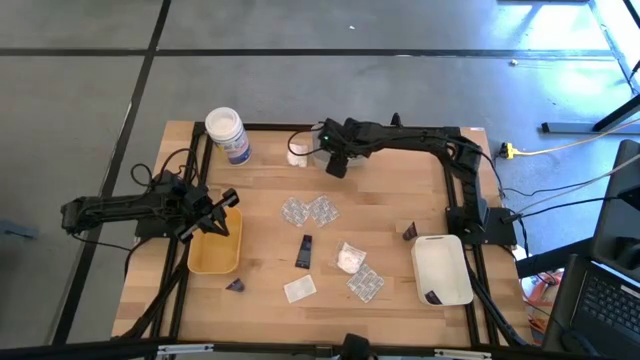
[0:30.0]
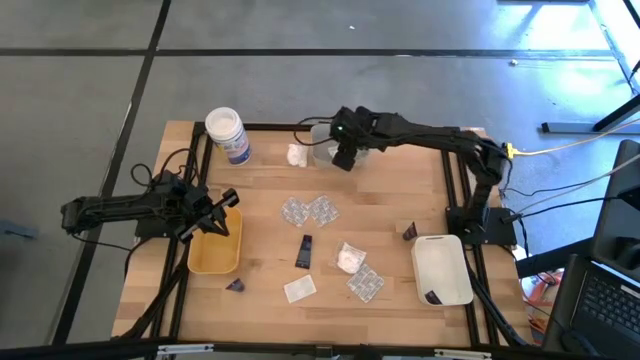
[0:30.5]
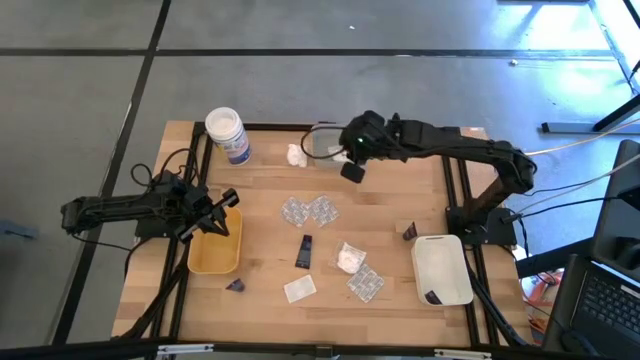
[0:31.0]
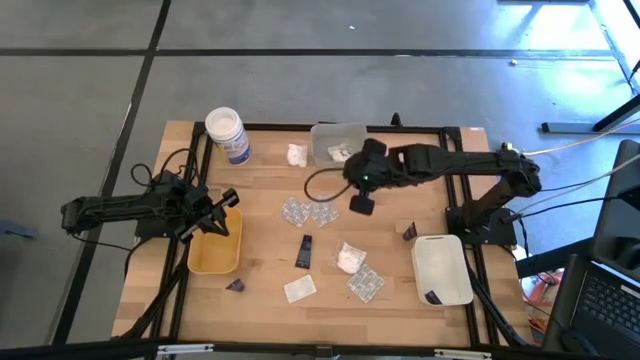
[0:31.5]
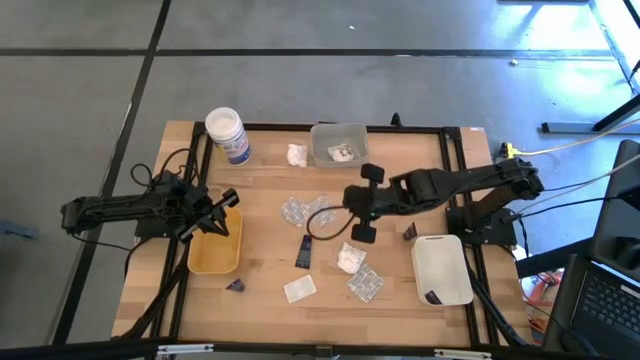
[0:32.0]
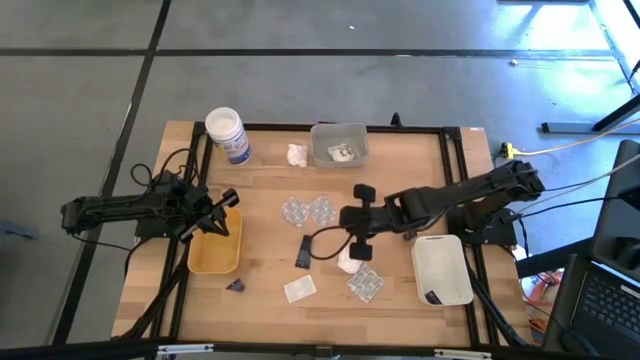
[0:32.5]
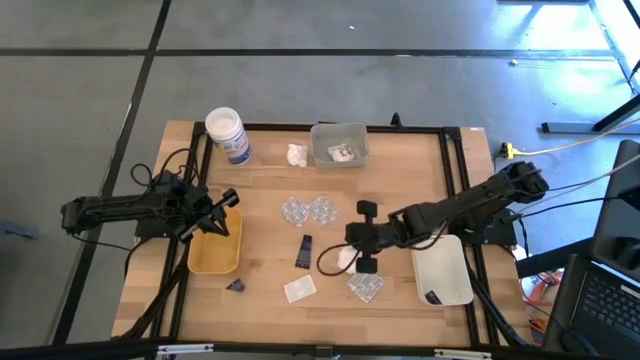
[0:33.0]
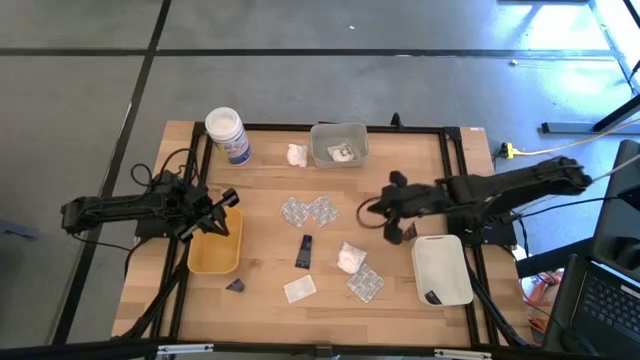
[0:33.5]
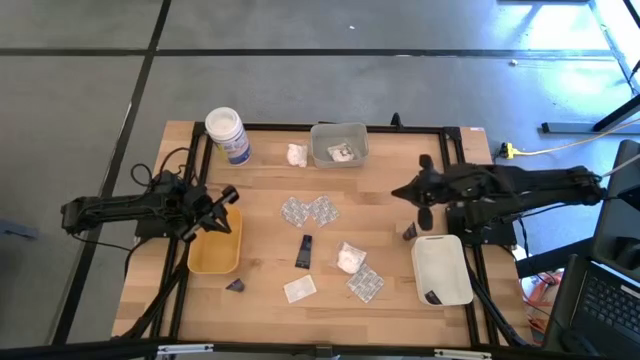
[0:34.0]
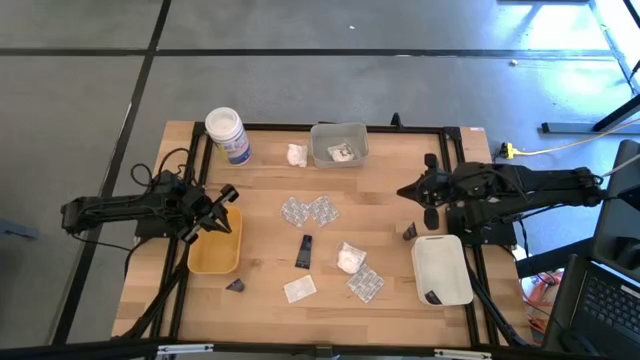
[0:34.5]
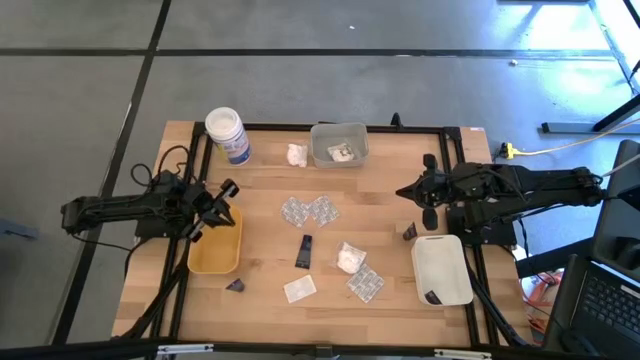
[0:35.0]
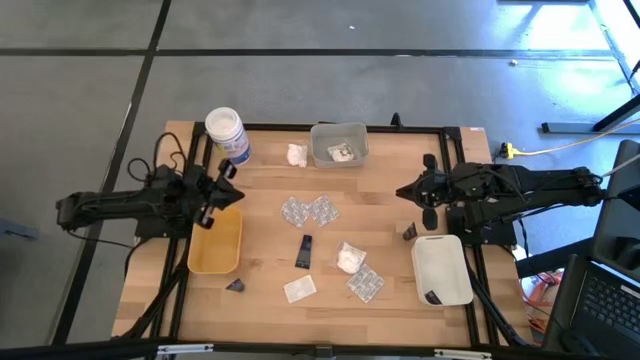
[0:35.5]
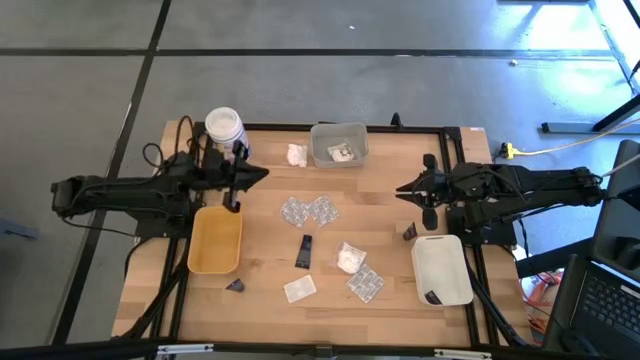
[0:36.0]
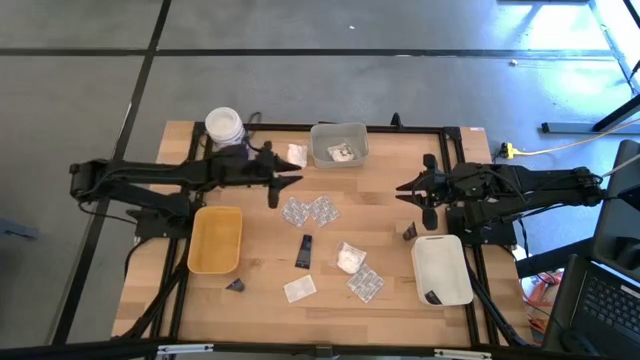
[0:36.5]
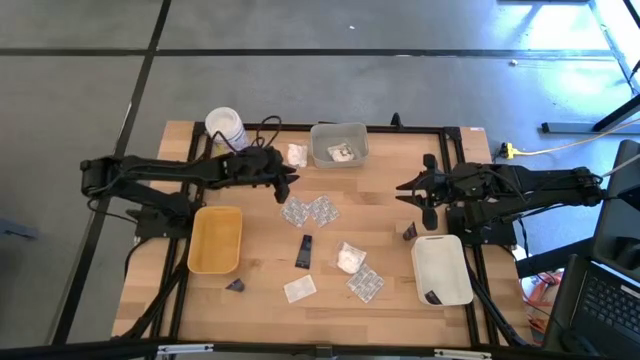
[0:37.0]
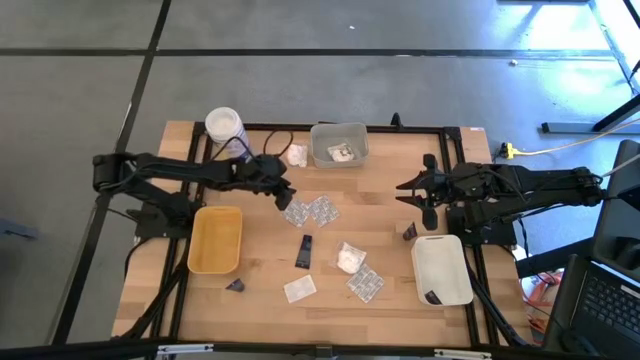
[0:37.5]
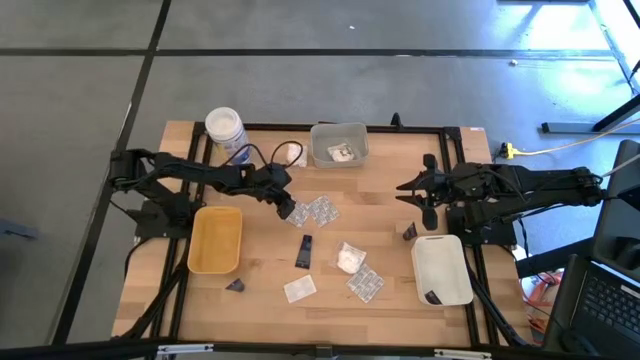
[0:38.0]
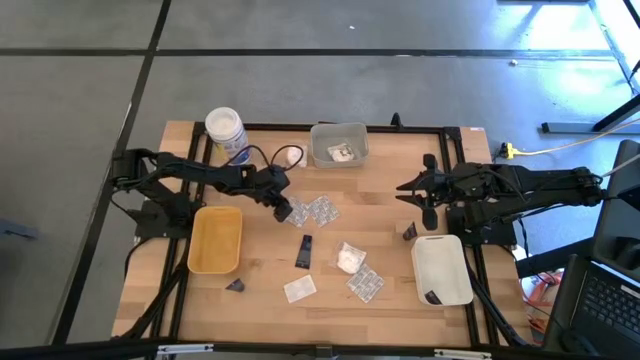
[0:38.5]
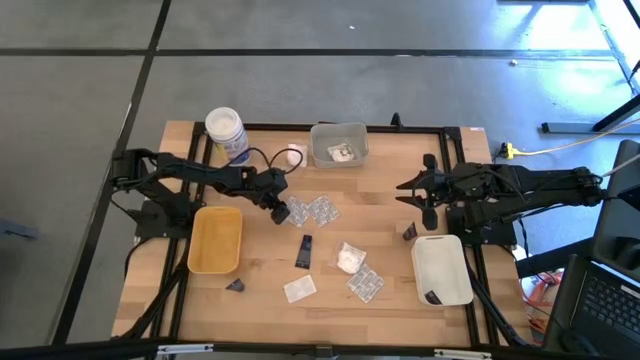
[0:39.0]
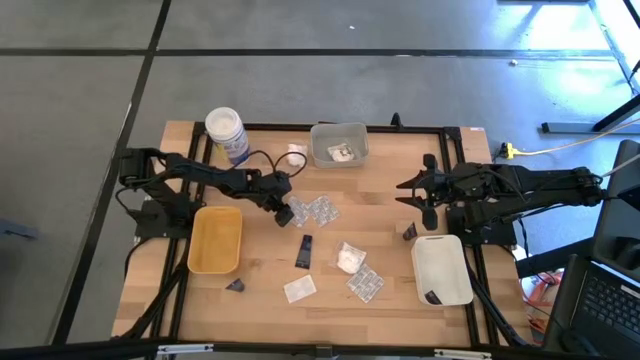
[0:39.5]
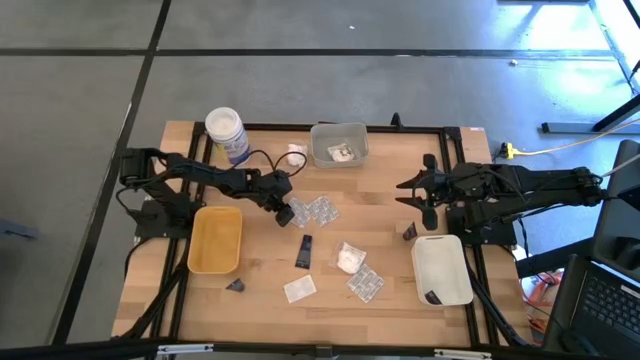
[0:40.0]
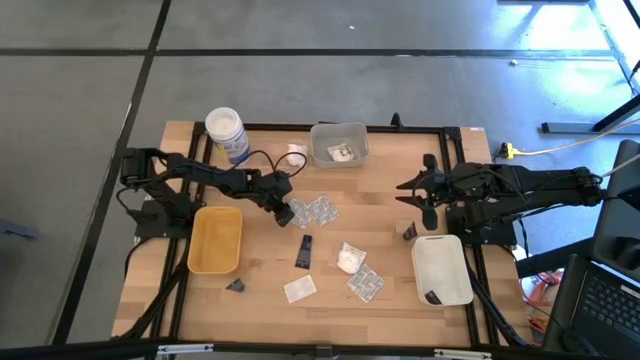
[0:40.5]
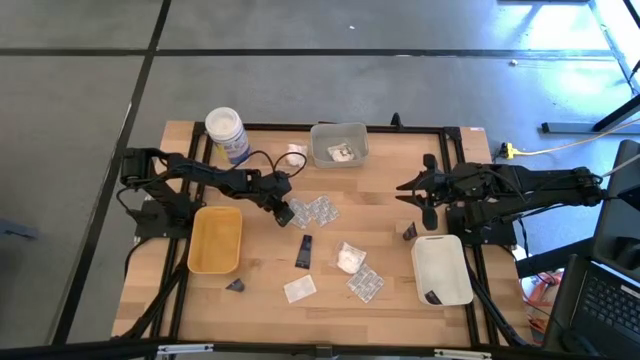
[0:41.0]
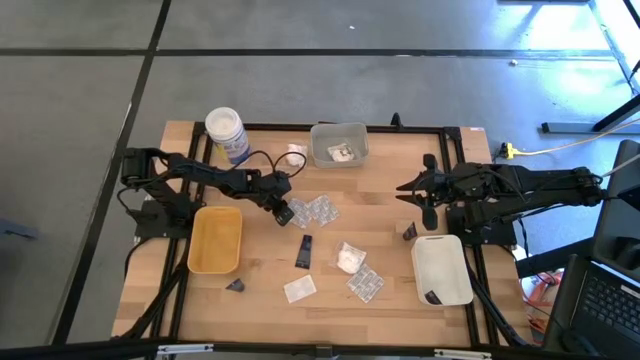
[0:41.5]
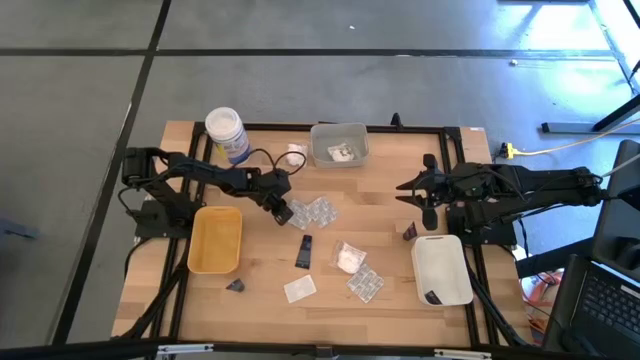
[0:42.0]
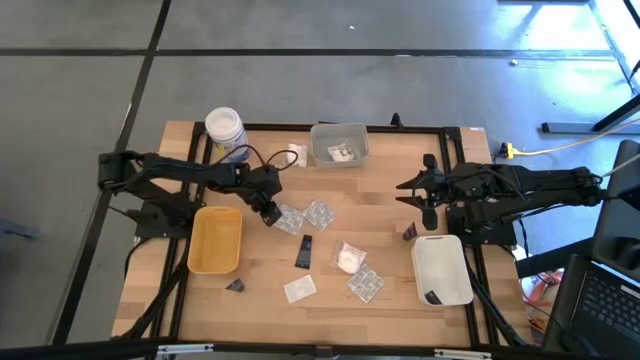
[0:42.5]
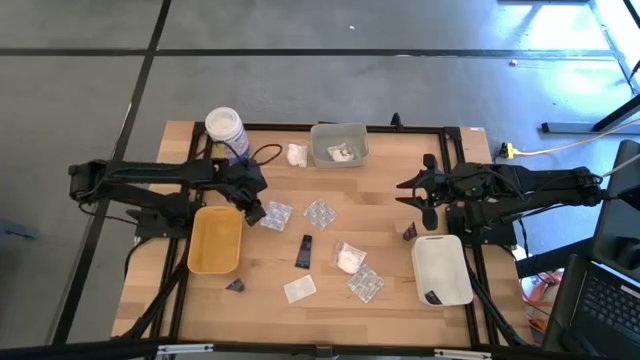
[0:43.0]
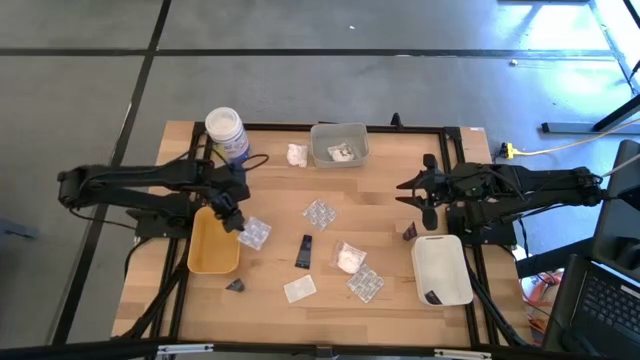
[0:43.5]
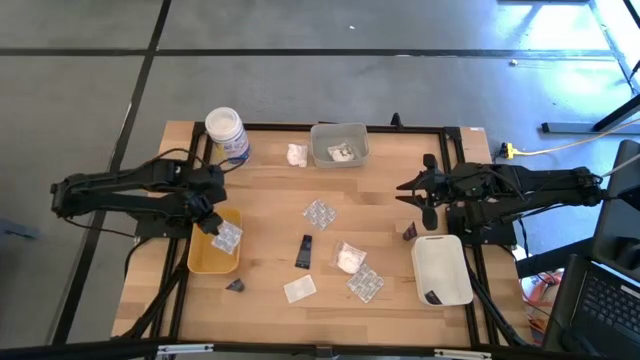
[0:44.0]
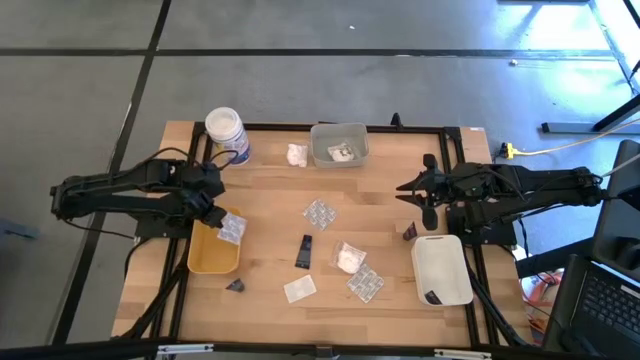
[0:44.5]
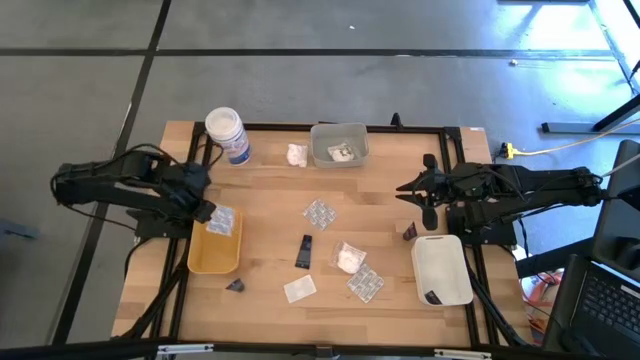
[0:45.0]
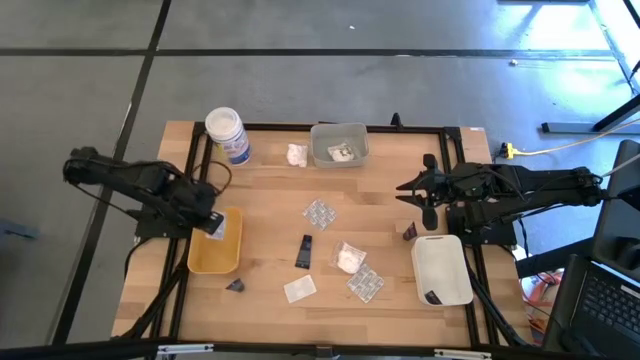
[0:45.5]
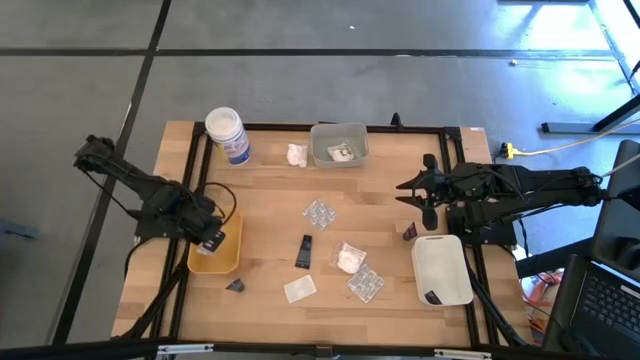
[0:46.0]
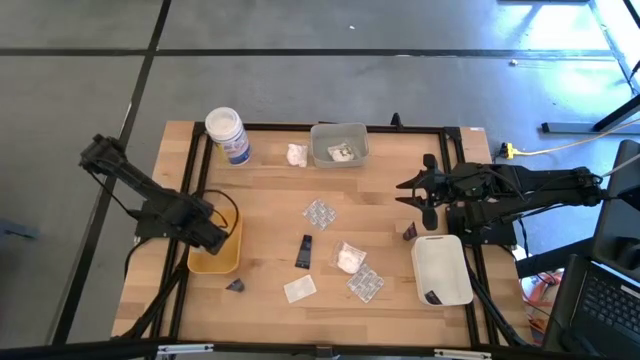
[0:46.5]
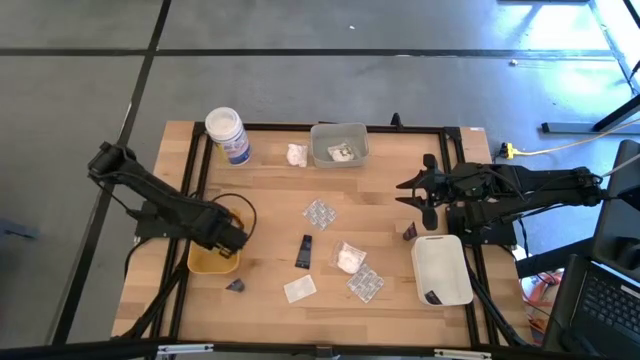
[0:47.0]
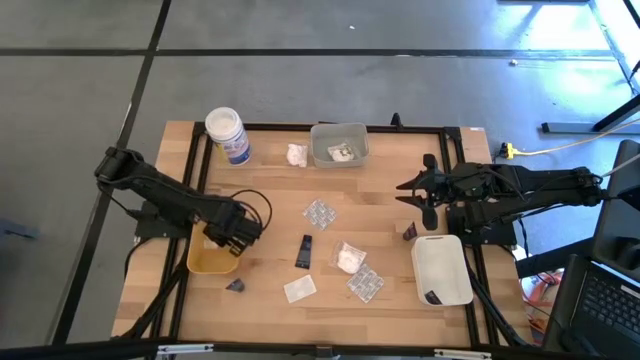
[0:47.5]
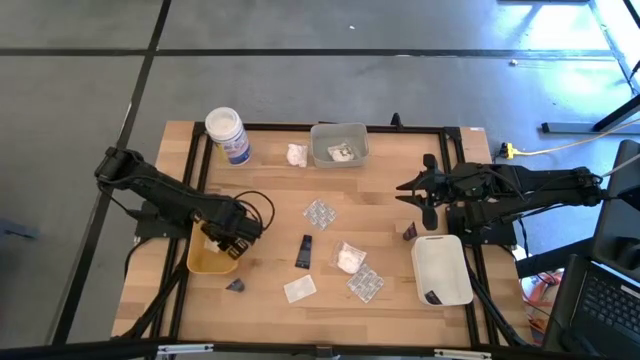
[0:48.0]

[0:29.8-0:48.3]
Task: Pick & Place Travel size toiletries
Put the white bandage pack into the yellow bin

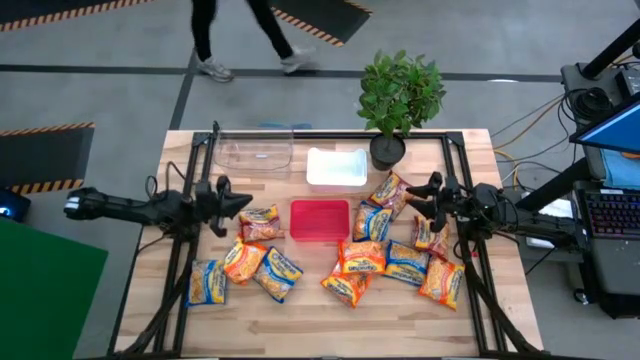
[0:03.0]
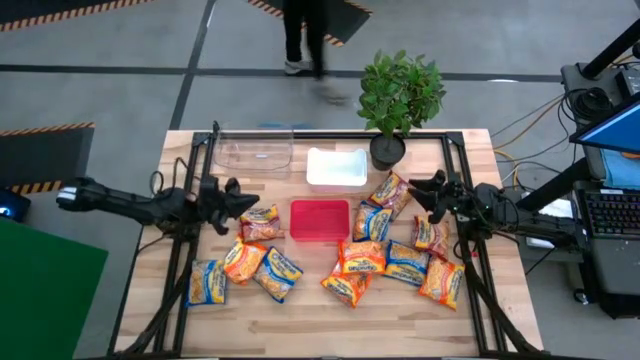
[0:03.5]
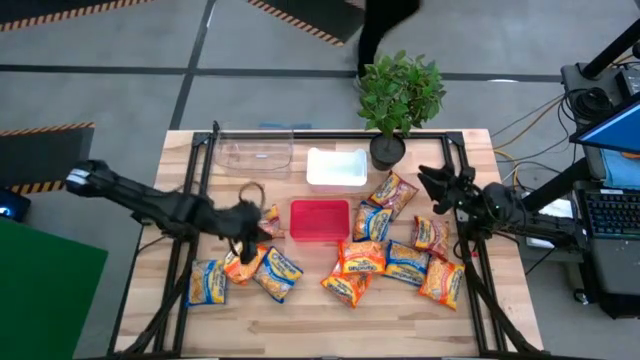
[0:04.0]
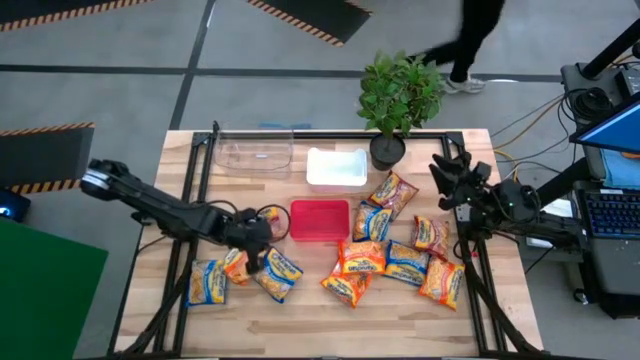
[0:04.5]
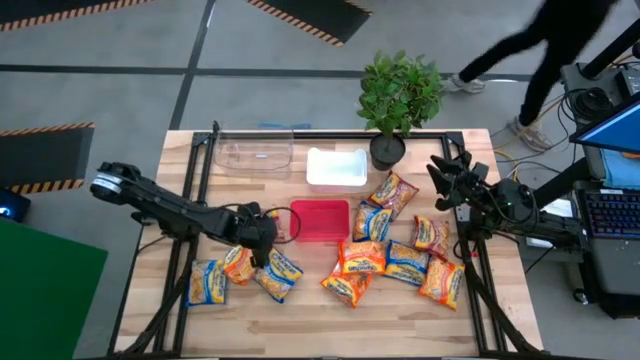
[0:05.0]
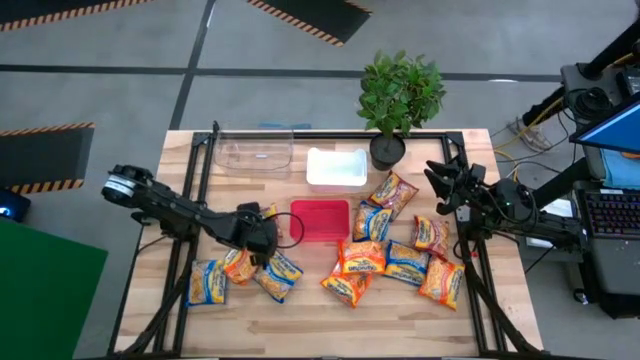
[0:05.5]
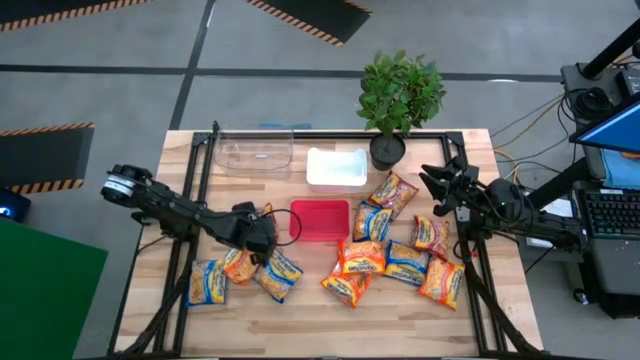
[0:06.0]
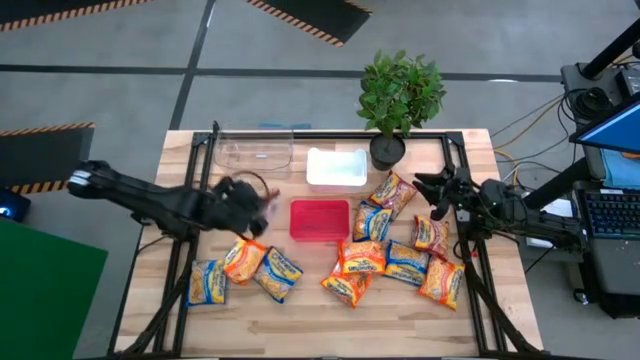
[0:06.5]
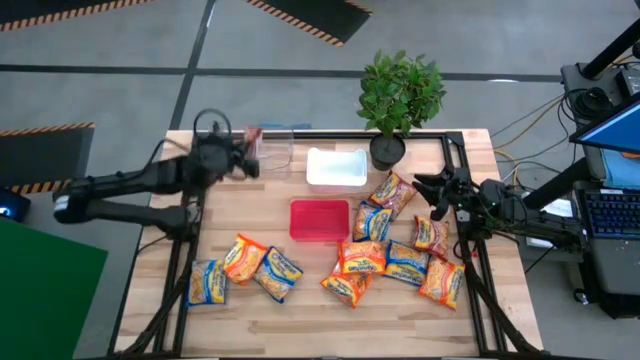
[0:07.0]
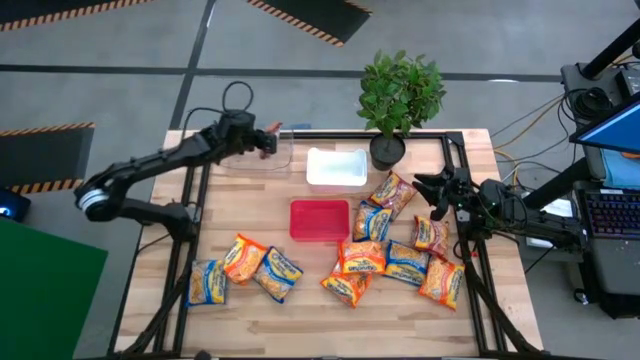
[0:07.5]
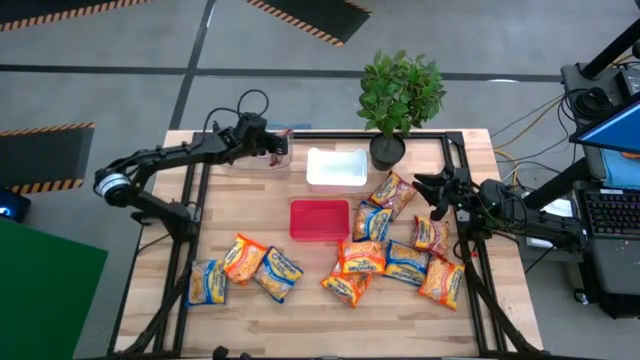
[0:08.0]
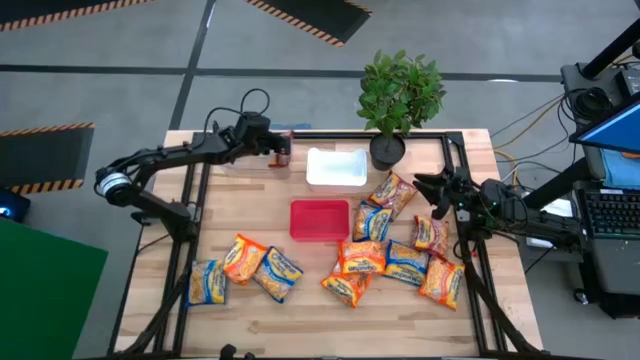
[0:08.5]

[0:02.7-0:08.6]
Task: Sort Maruchan noodles
Put the red noodle pack into the transparent bin
